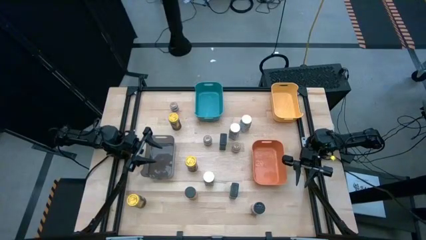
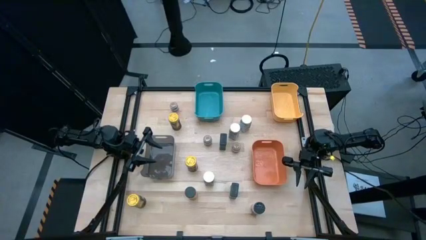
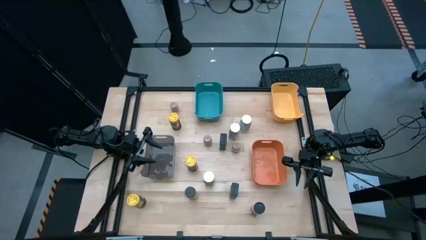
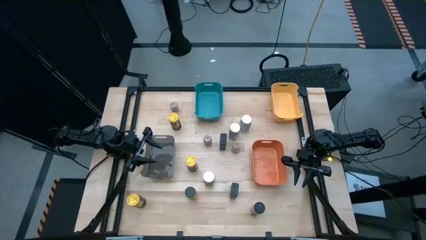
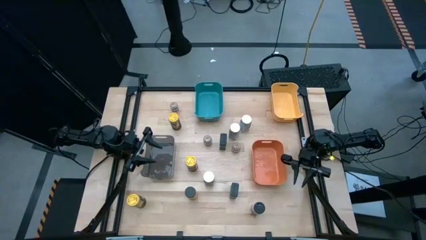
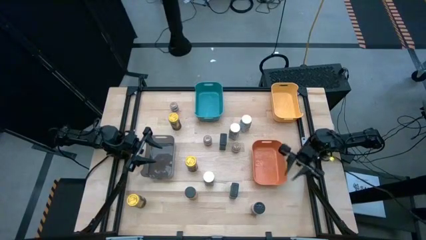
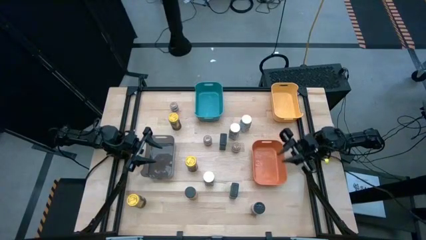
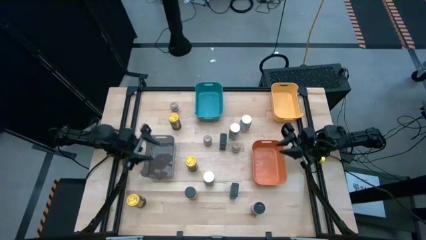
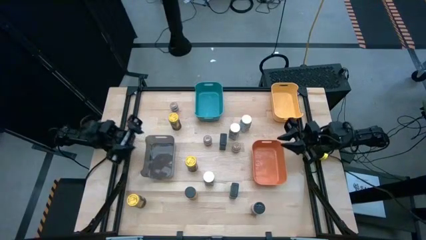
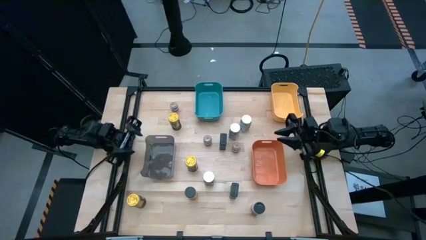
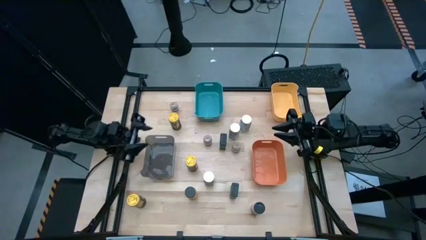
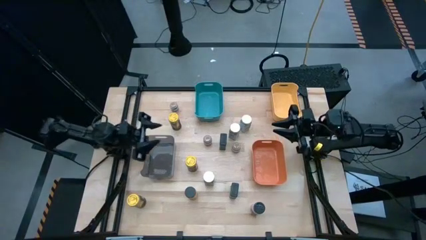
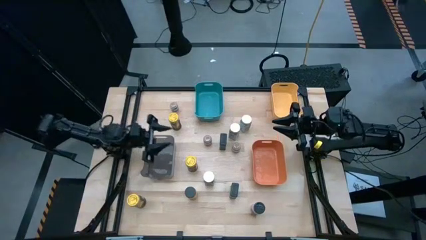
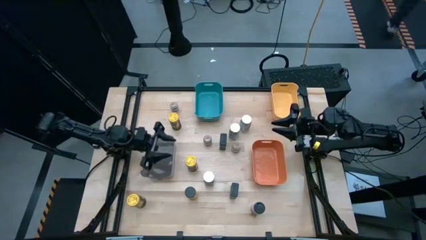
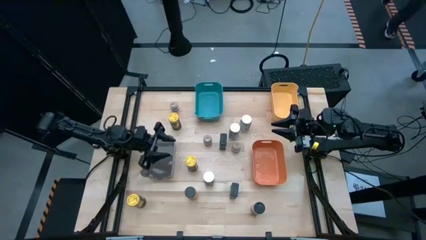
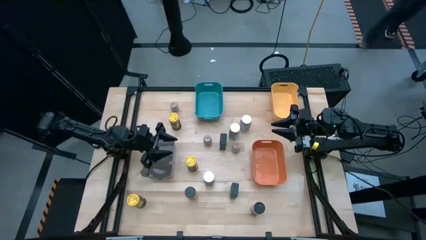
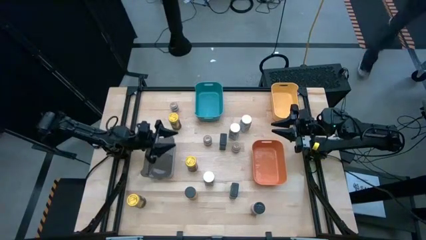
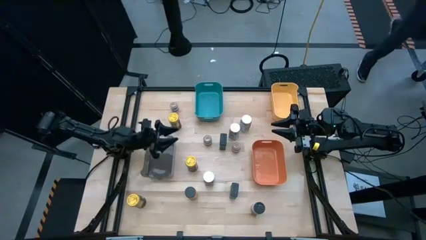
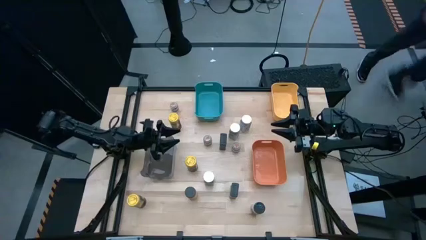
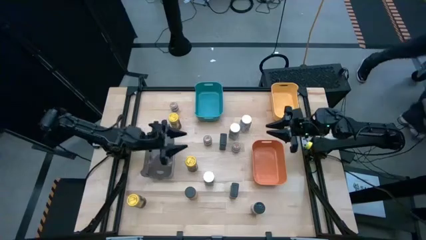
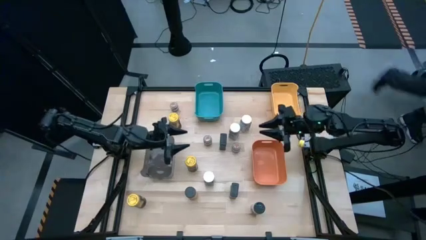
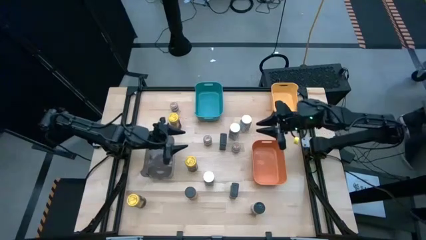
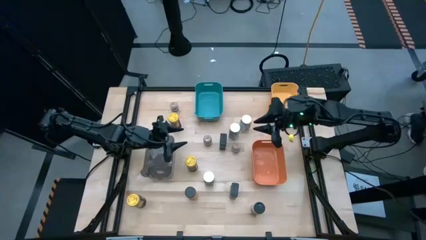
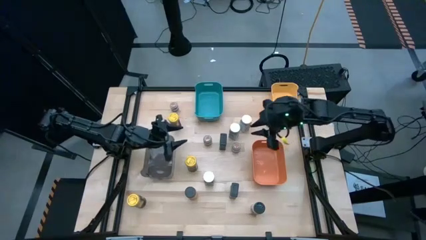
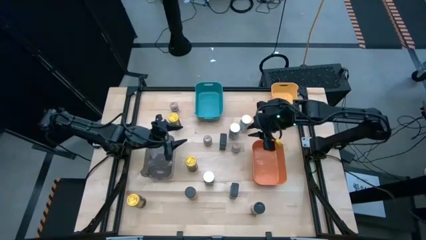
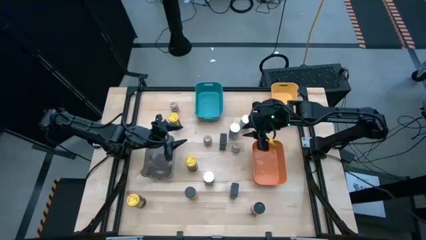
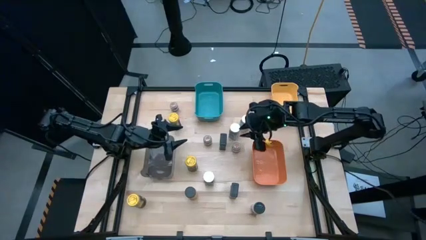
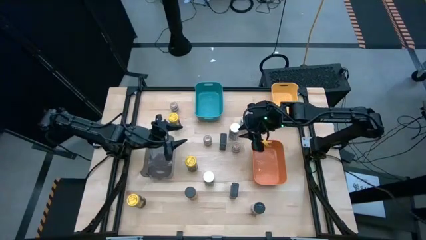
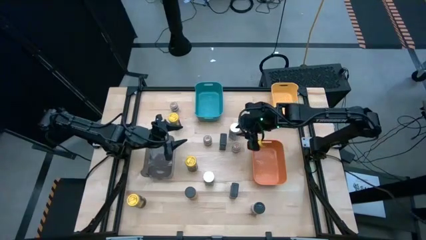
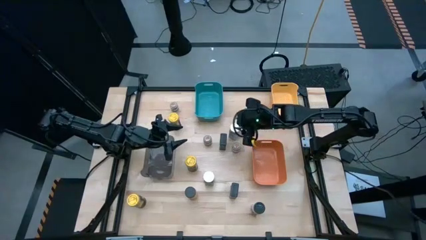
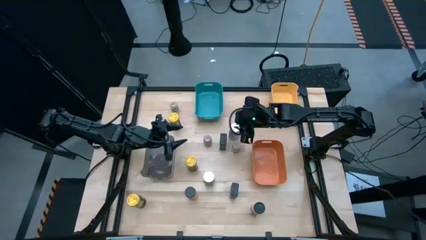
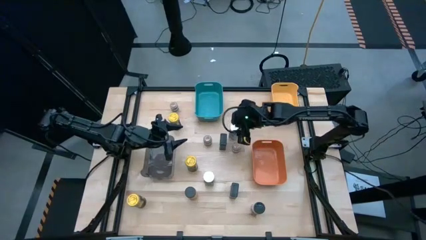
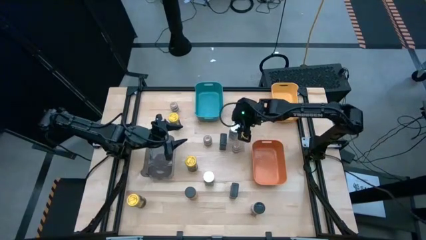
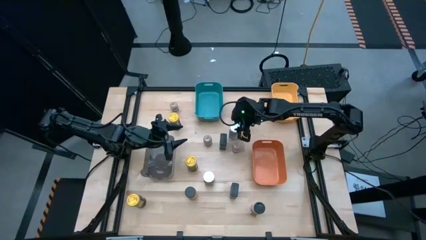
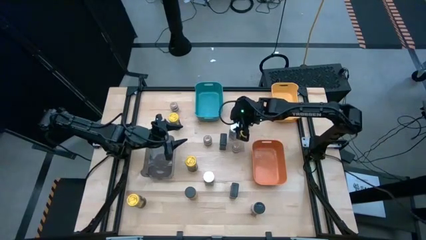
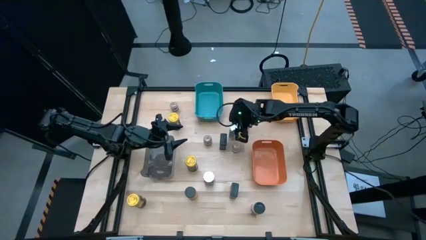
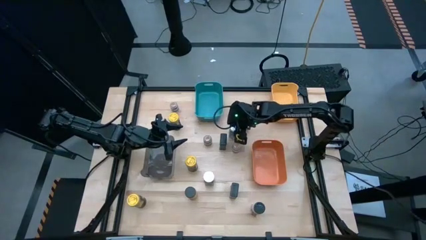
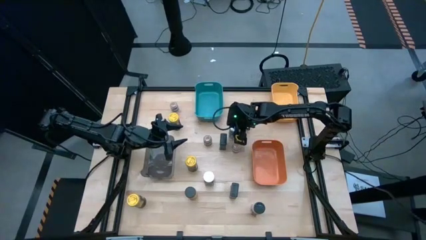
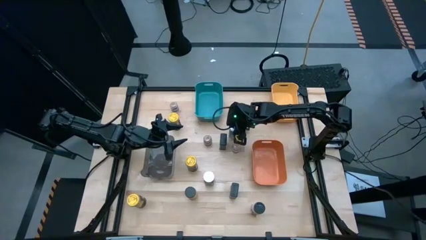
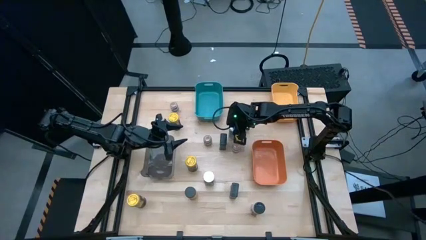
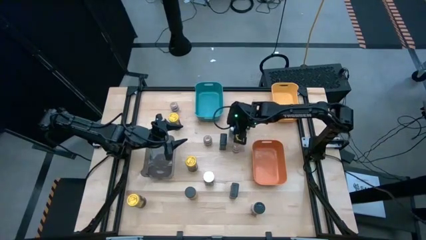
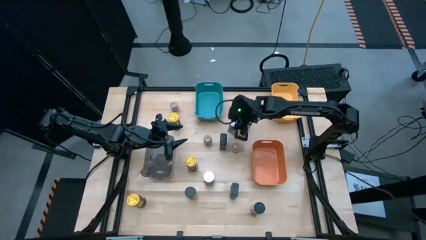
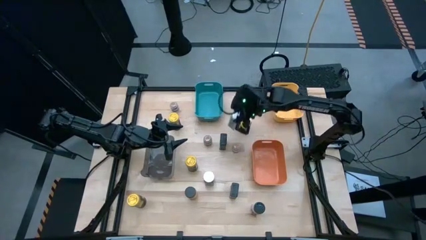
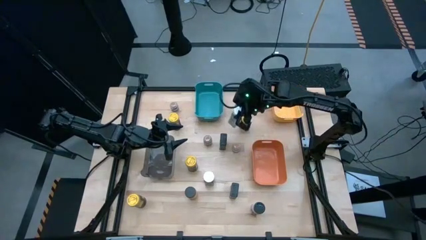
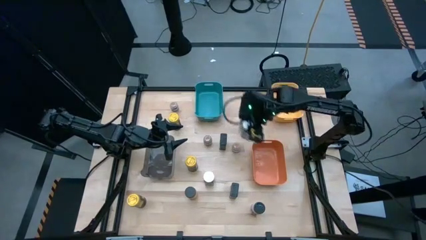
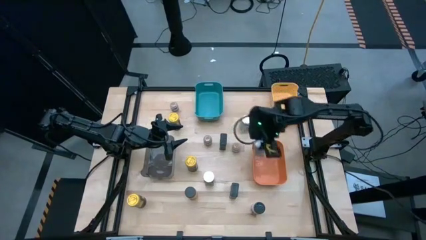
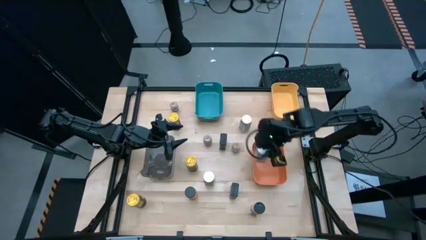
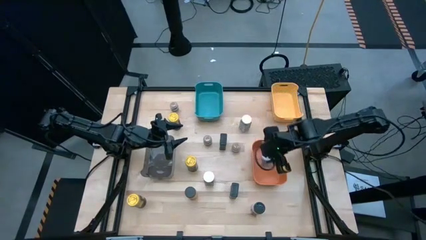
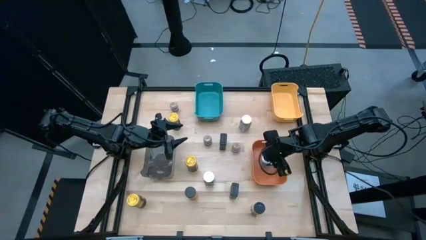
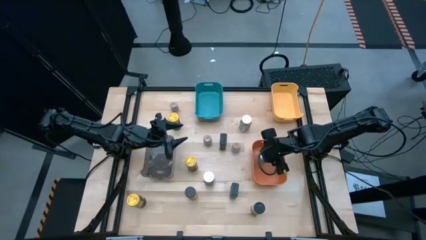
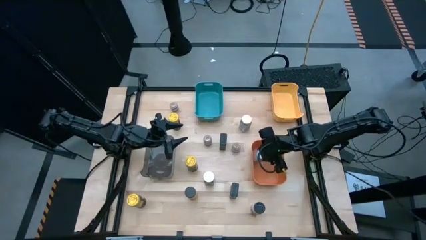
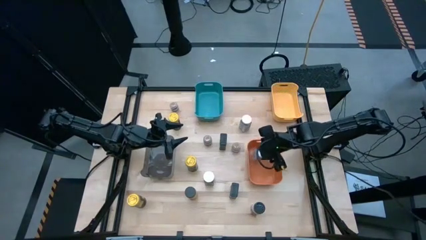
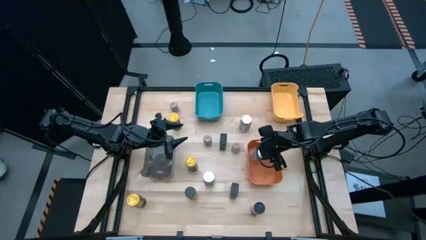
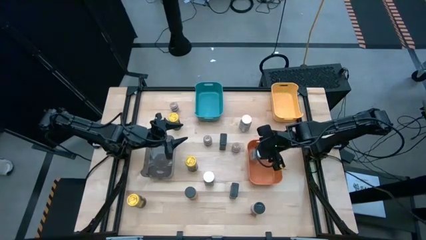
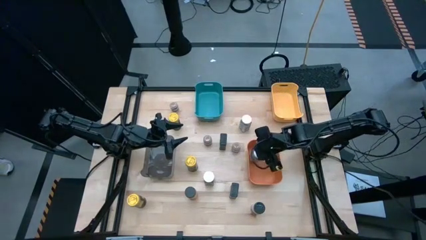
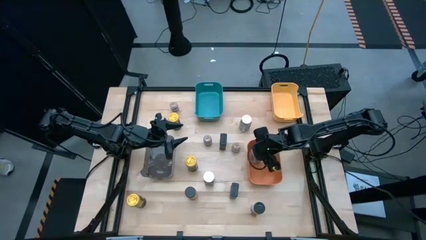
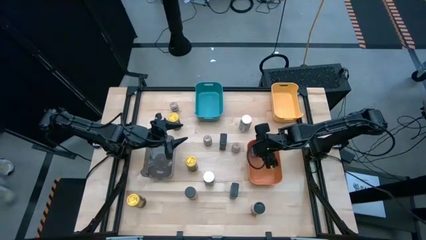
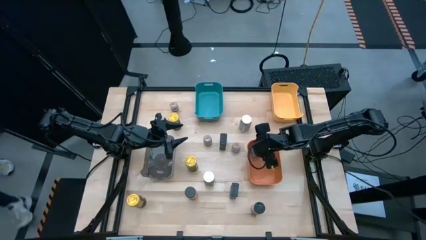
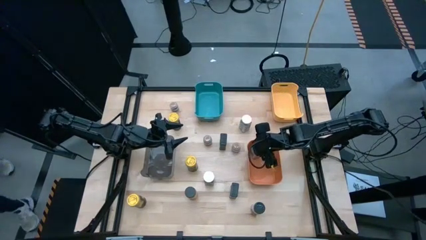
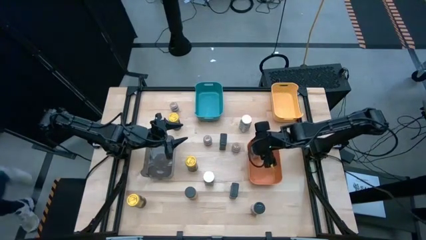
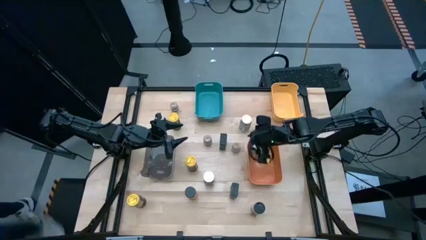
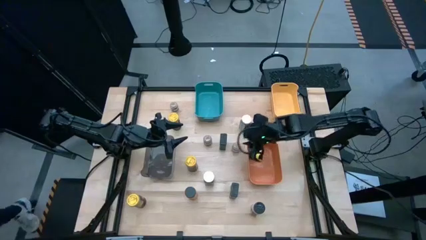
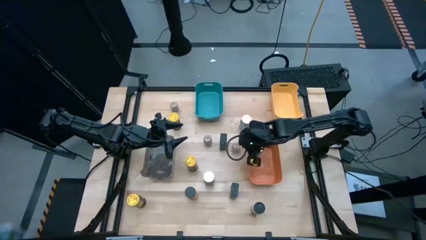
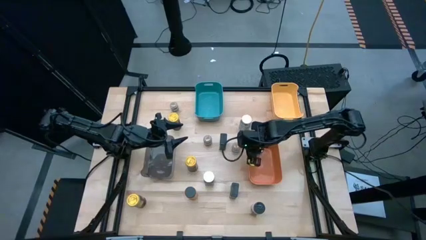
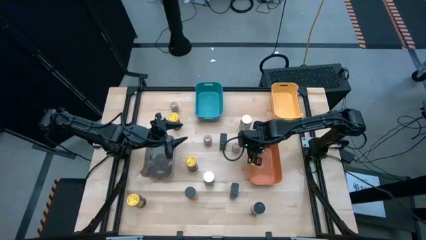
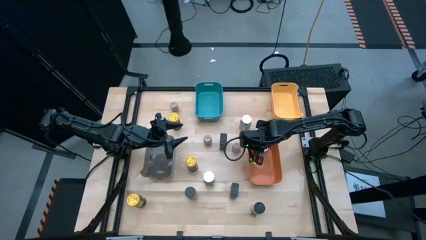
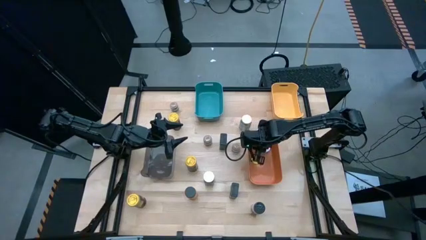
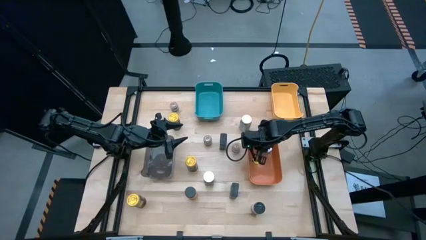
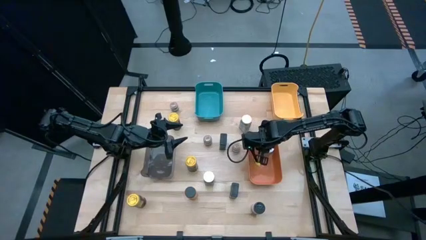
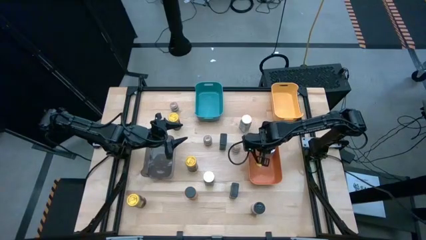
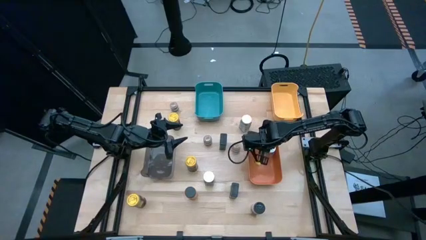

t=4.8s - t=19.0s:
Task: Sort spices by type
Put the center white seasoning bottle into the orange bin
